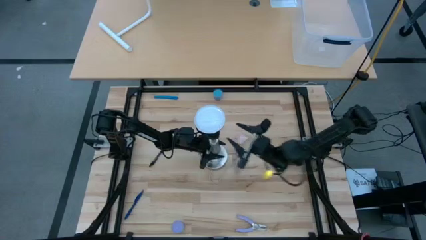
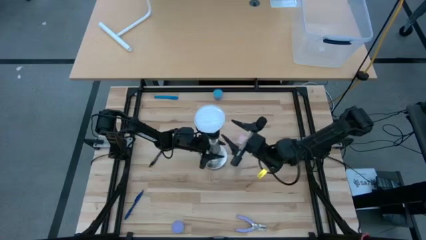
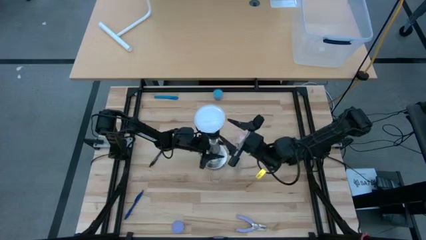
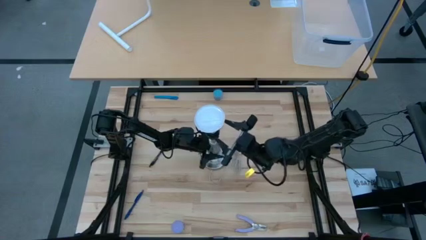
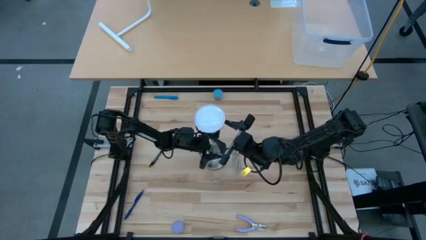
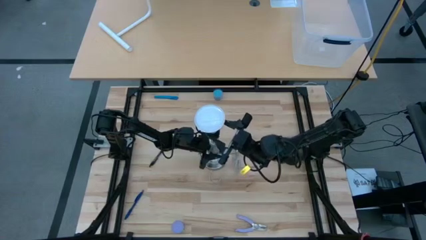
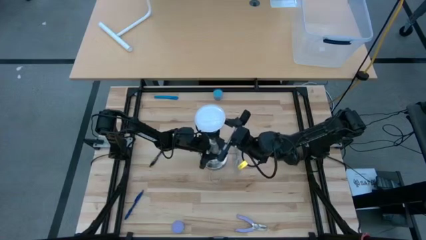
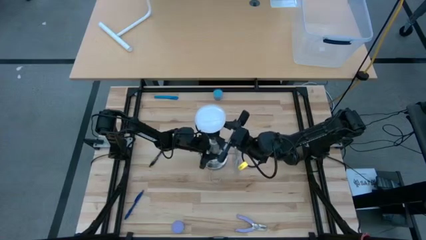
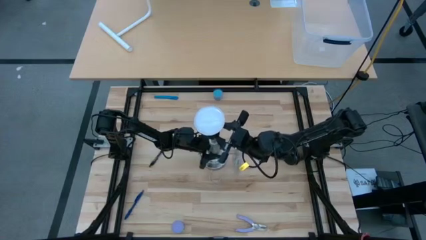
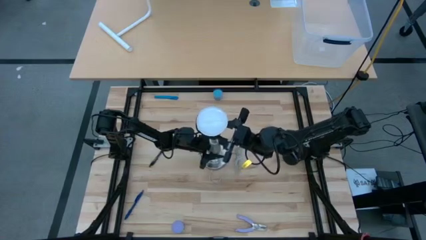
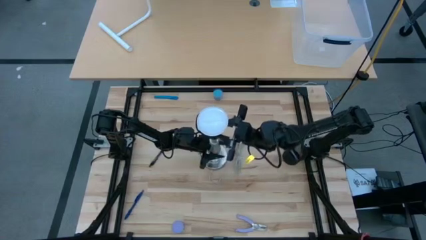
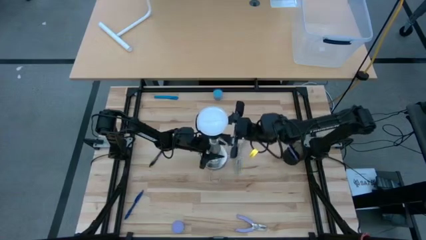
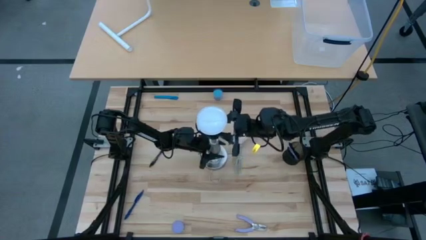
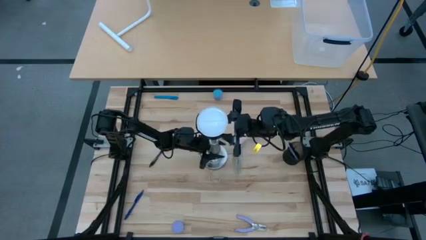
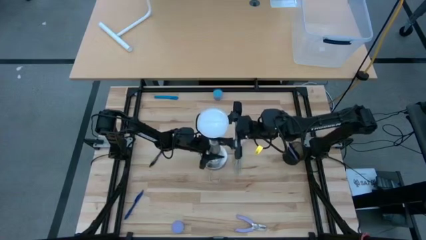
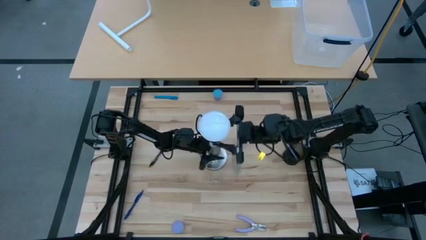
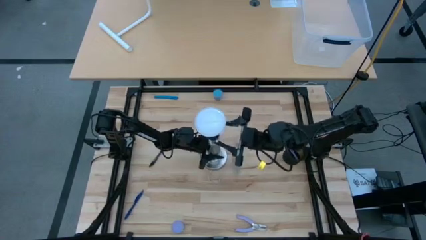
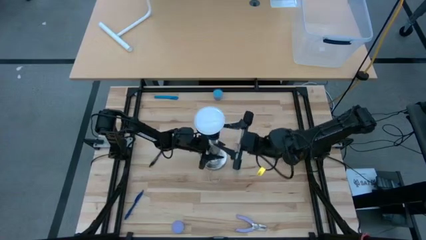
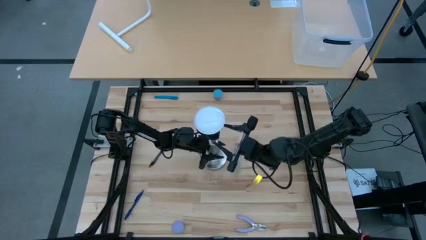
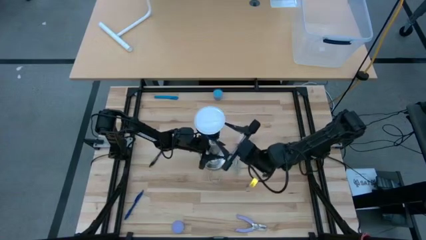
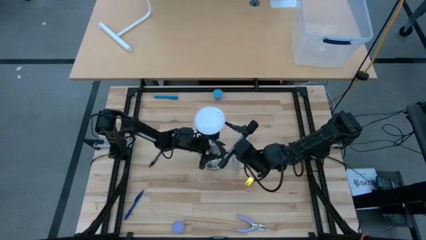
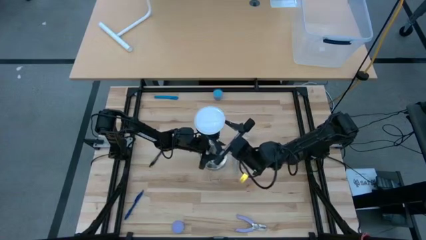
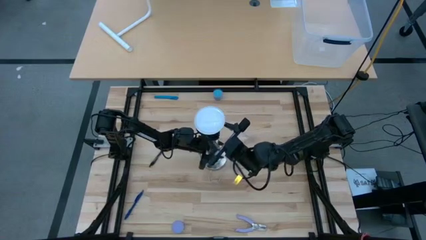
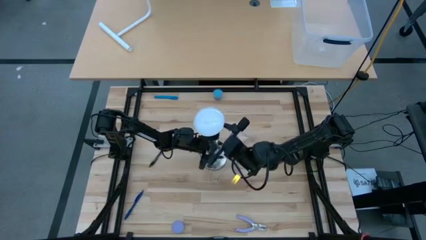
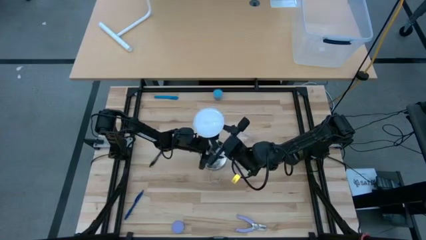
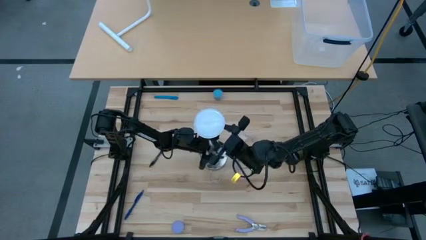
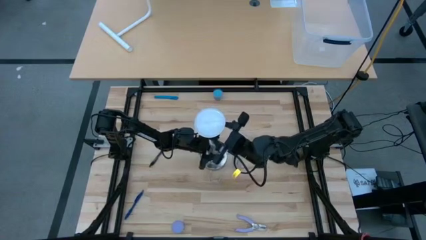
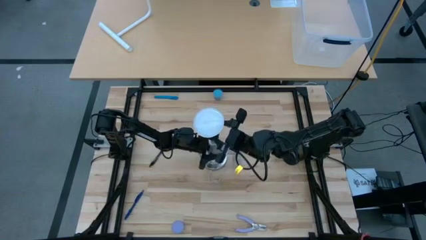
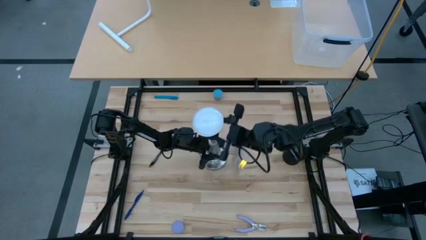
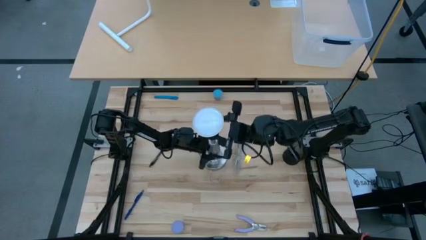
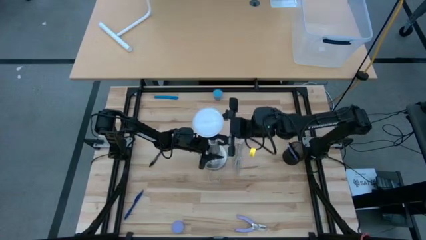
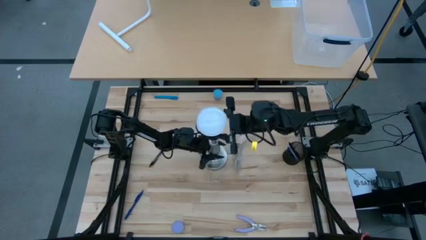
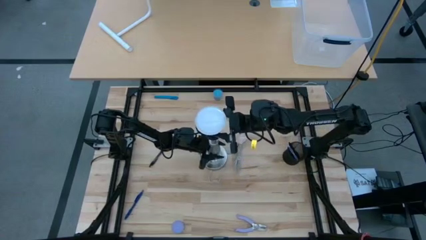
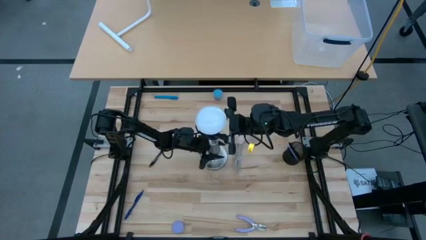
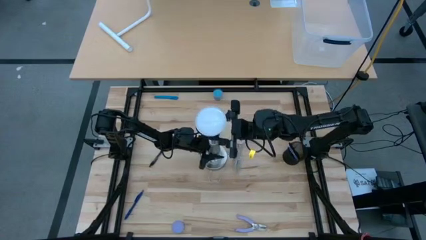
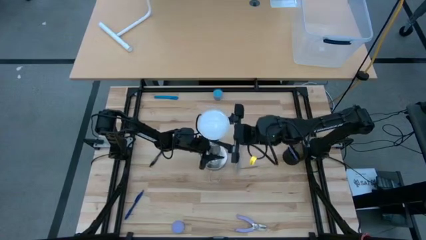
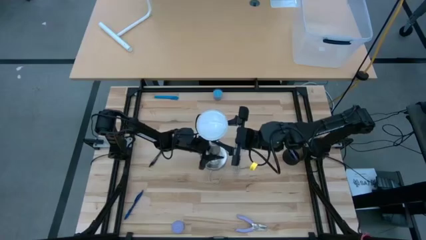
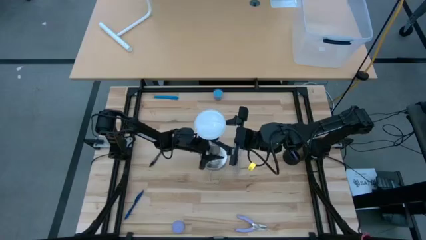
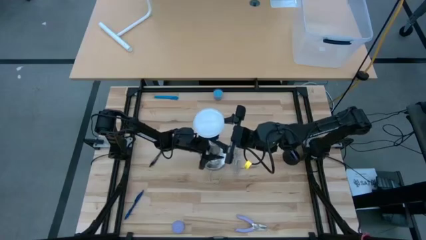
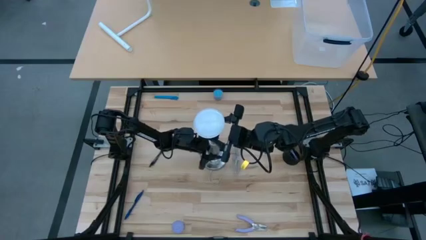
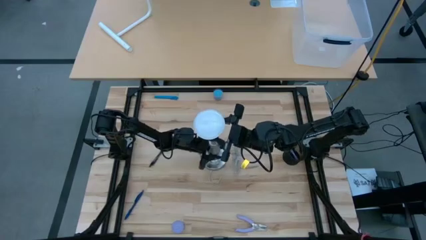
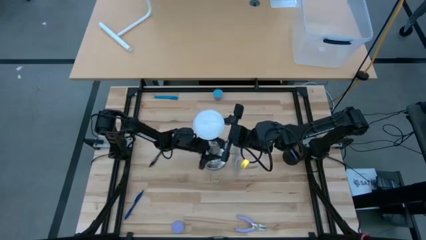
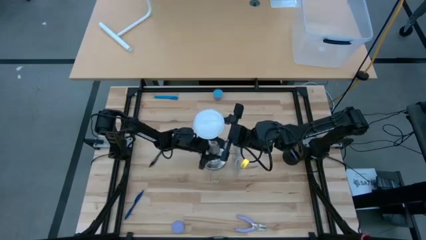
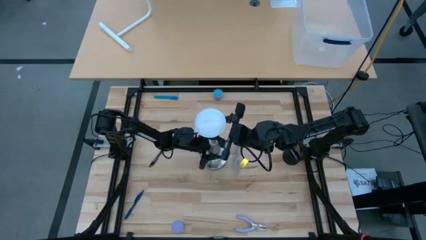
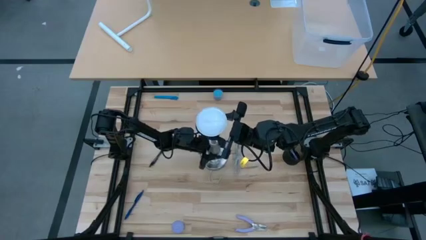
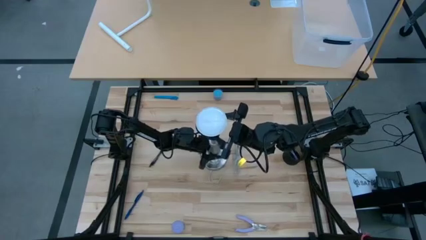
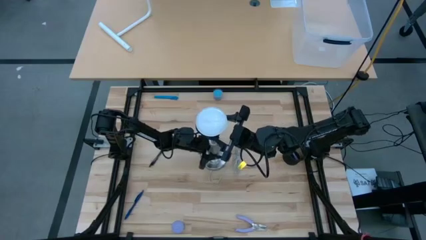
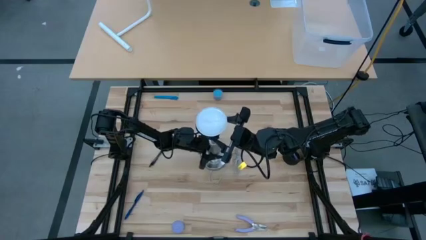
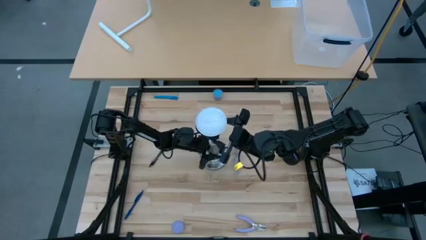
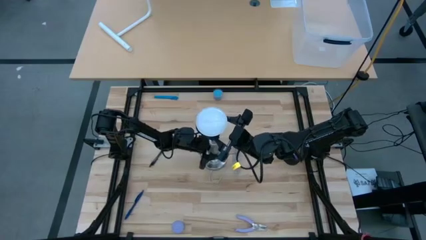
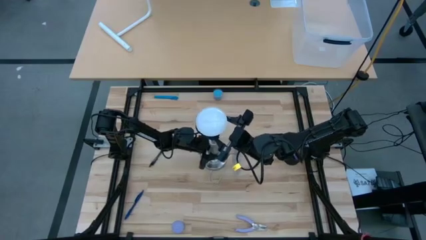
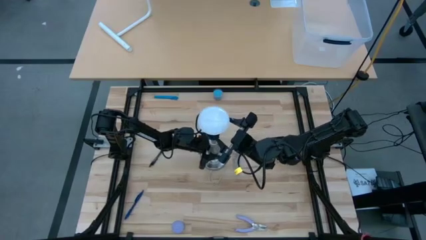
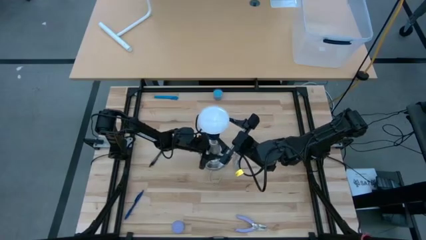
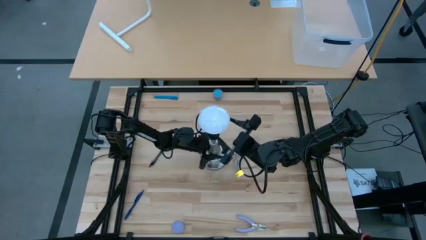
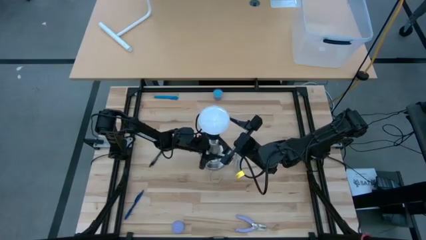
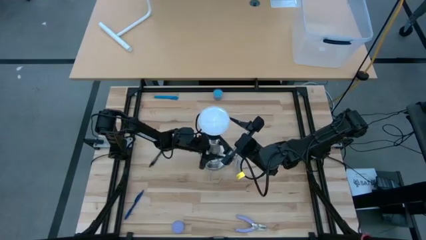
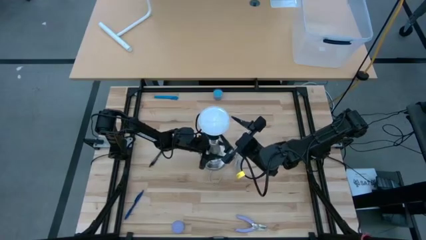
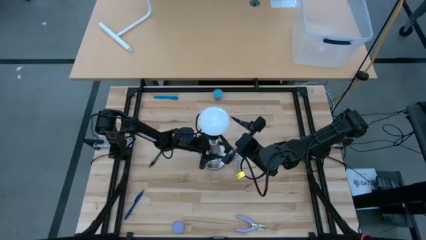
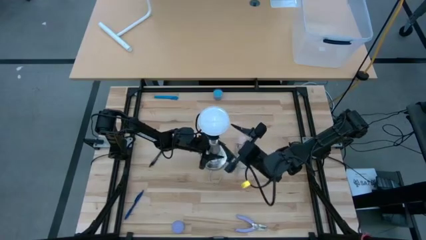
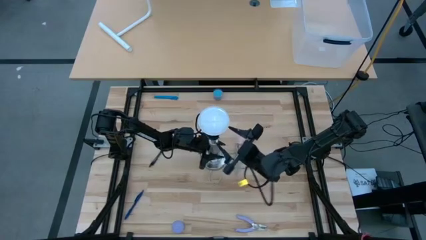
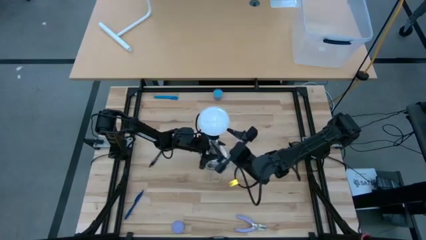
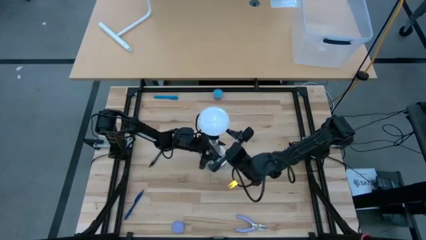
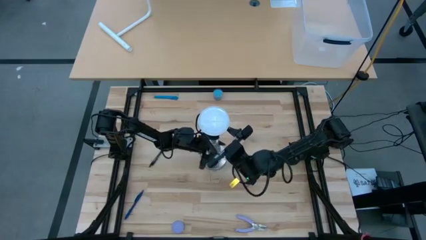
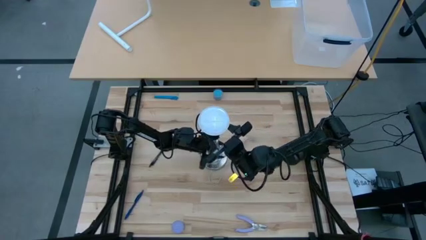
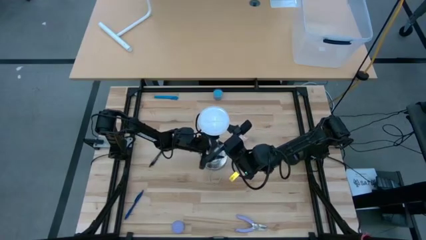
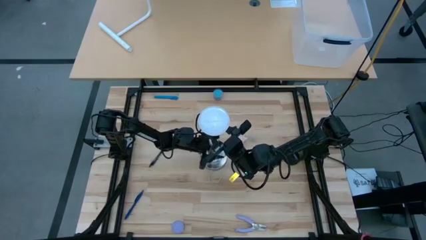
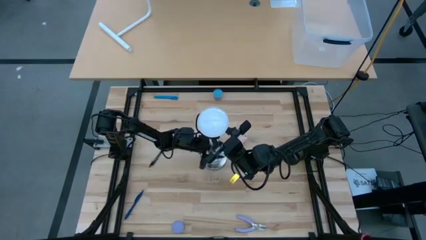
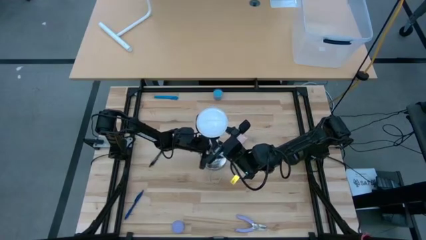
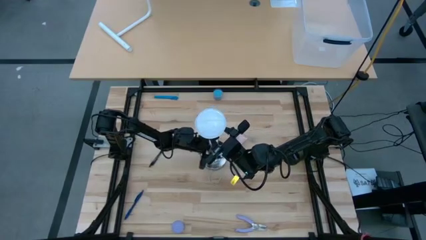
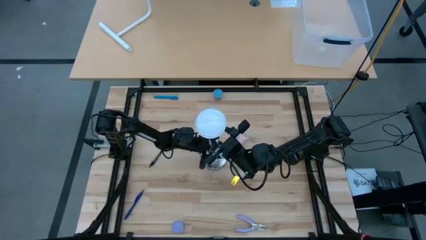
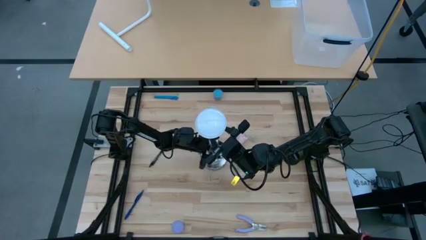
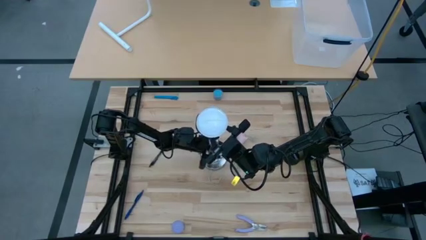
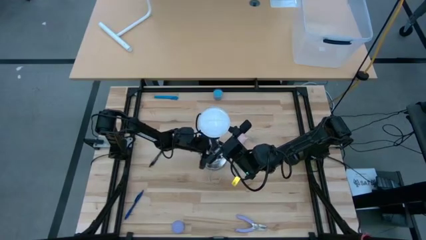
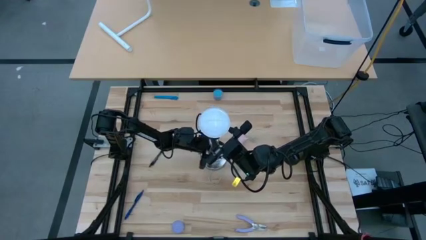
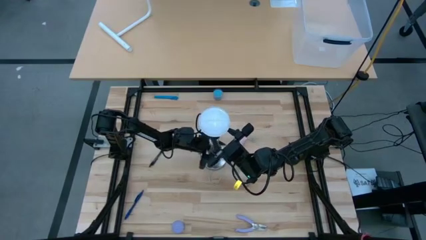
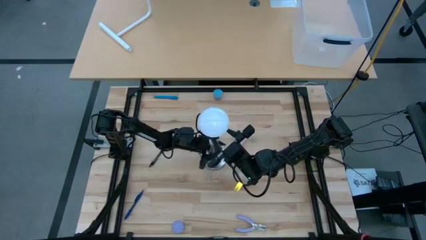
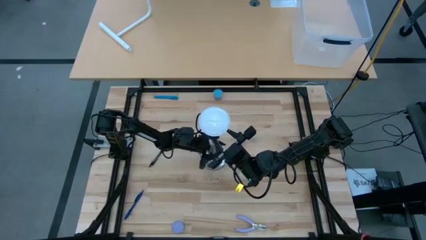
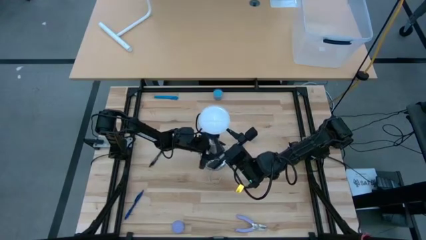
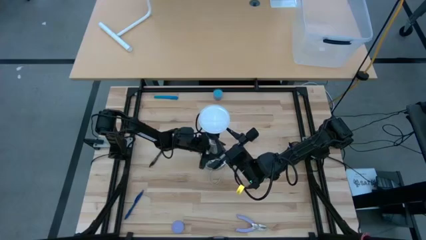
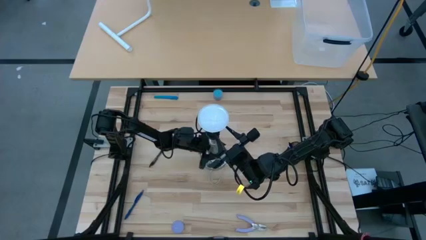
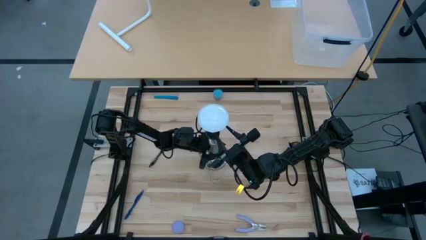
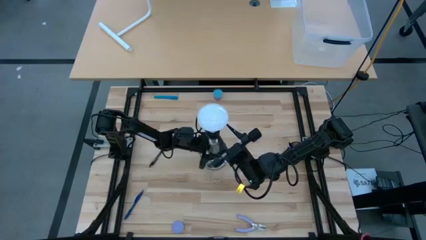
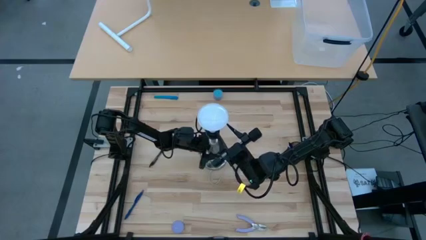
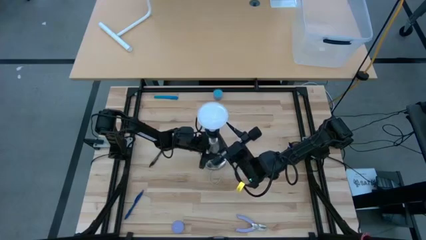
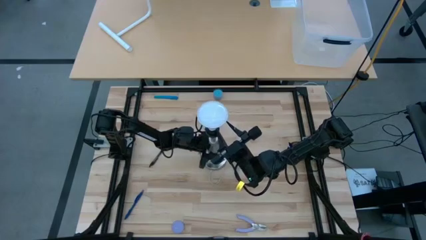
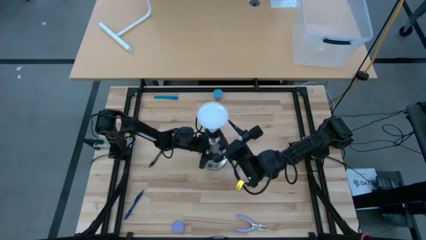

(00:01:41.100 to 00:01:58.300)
Task: Screw lightbulb
Remove the lightbulb from the lamp
